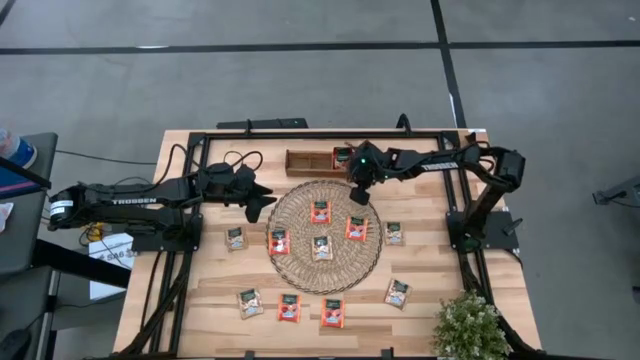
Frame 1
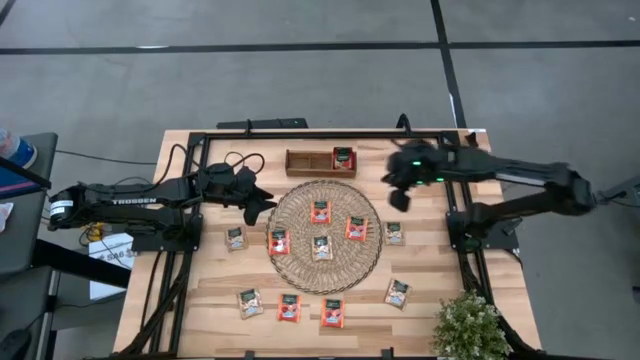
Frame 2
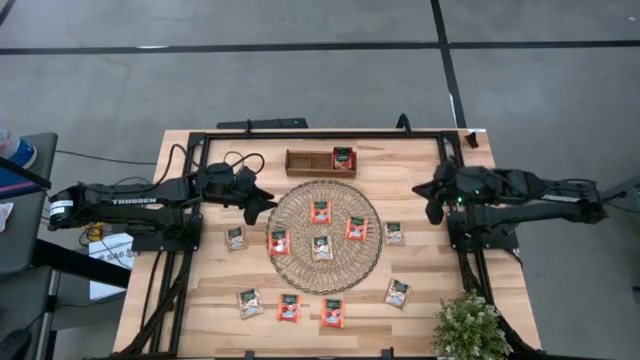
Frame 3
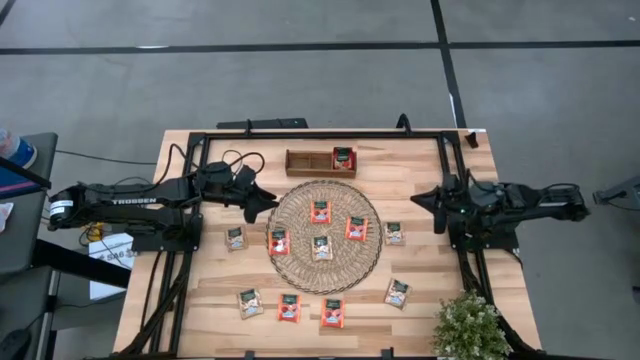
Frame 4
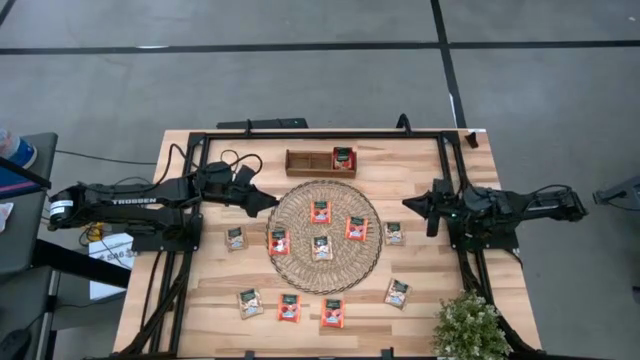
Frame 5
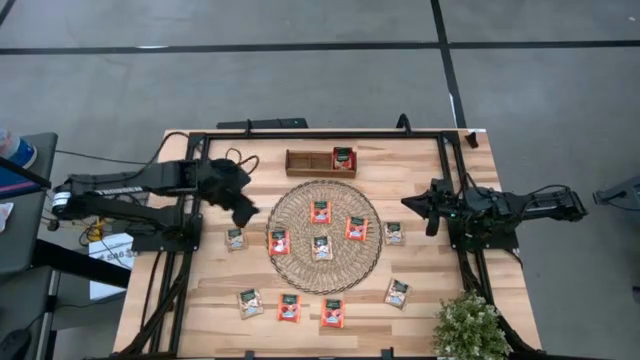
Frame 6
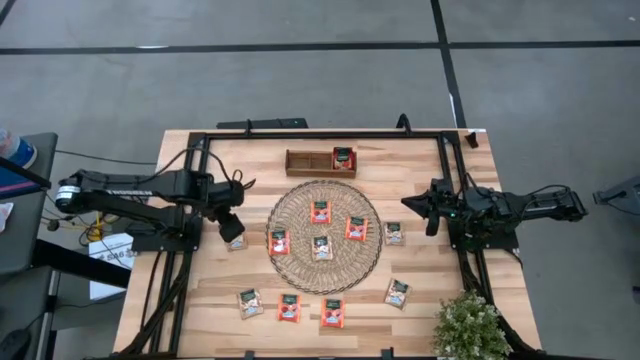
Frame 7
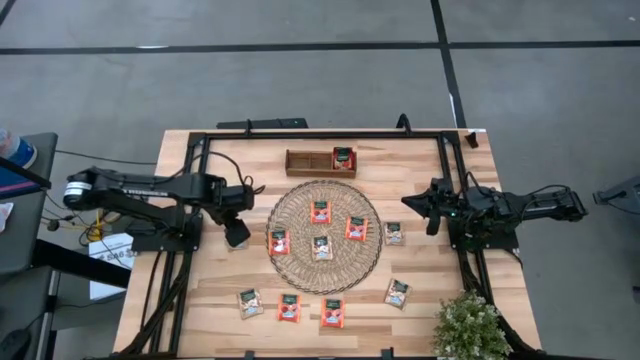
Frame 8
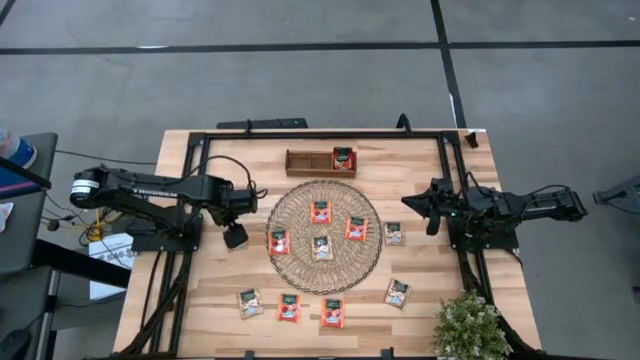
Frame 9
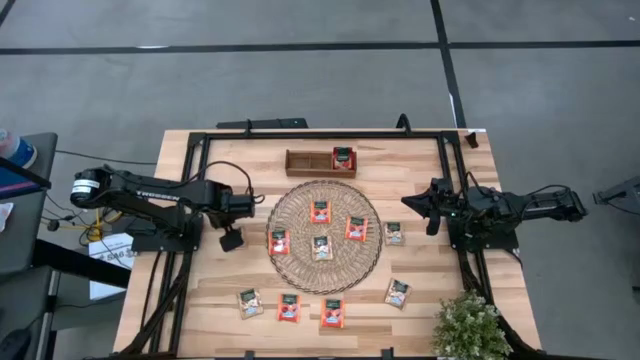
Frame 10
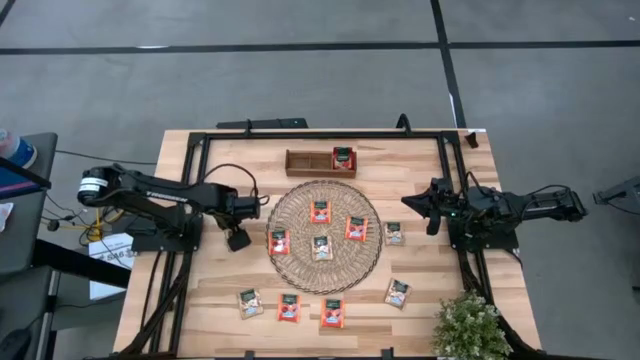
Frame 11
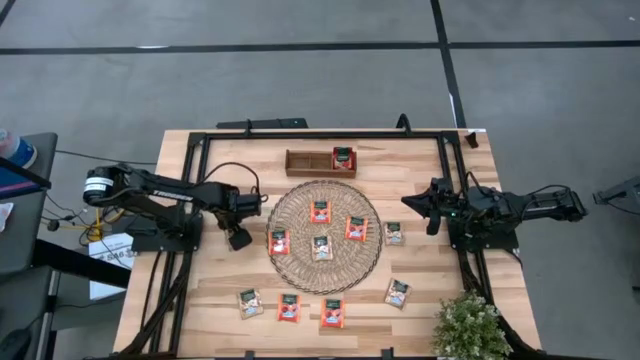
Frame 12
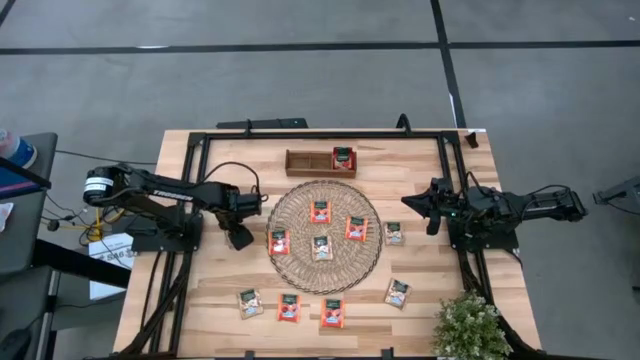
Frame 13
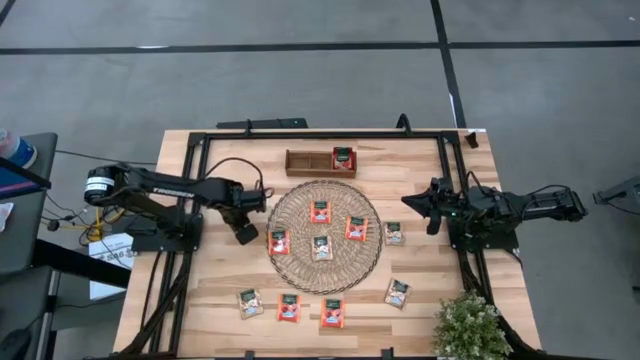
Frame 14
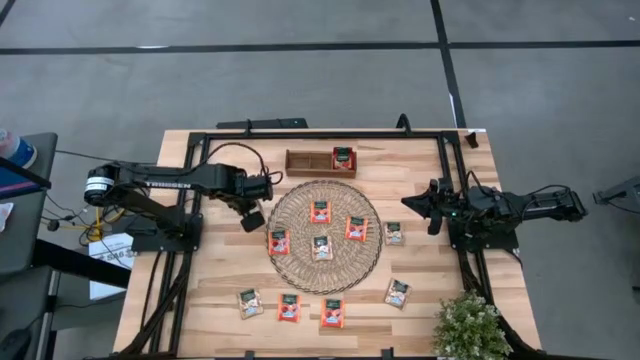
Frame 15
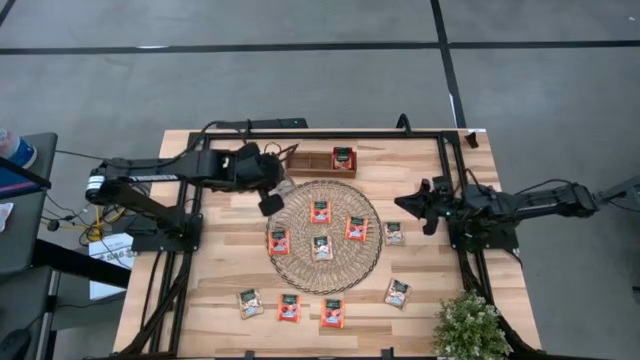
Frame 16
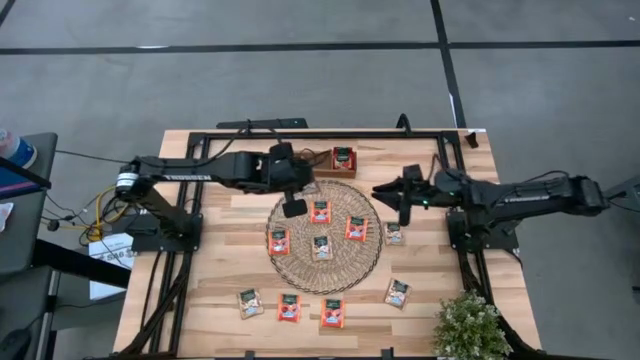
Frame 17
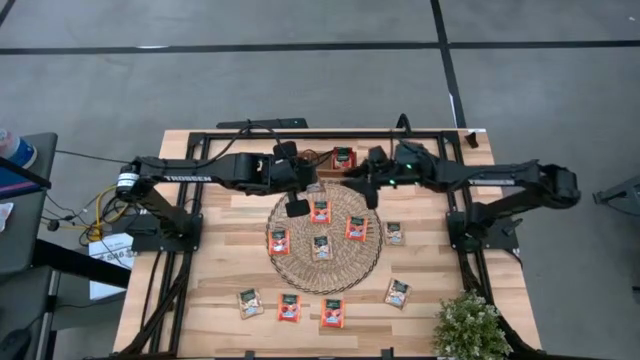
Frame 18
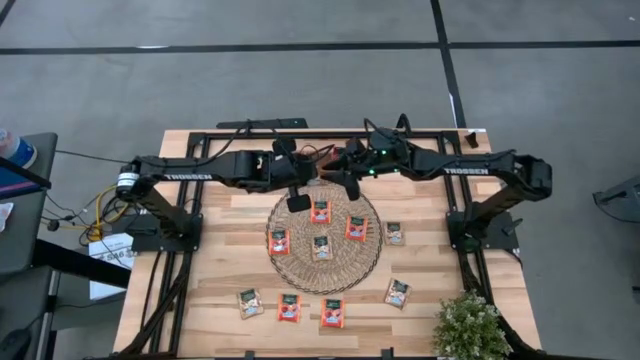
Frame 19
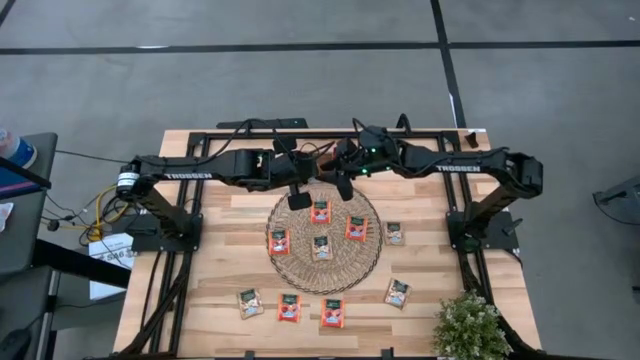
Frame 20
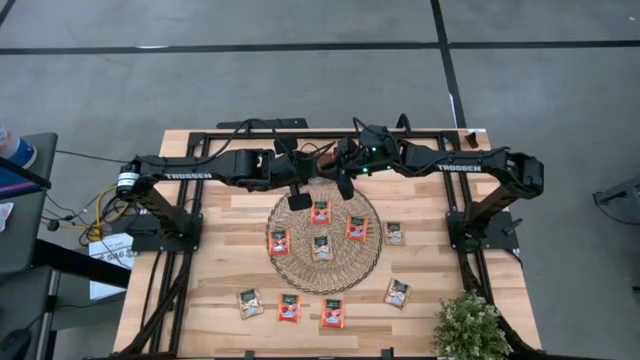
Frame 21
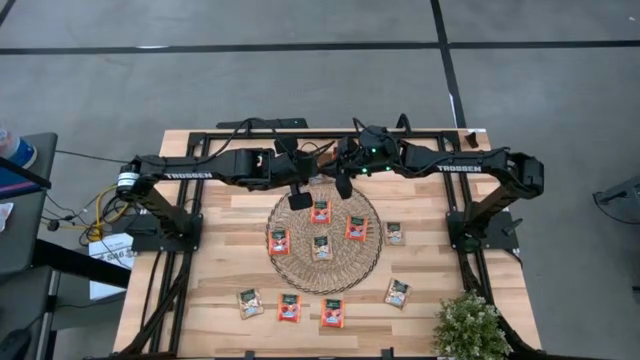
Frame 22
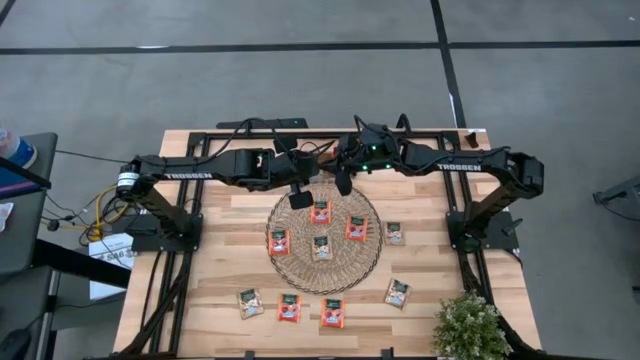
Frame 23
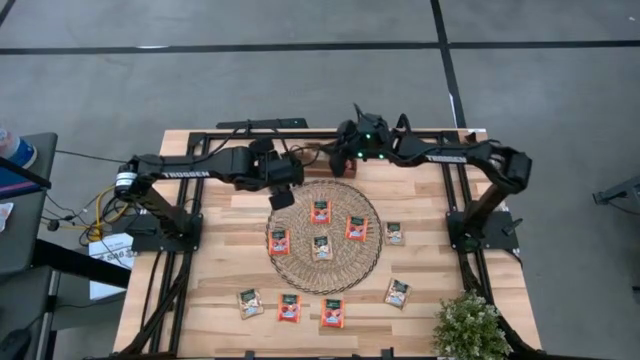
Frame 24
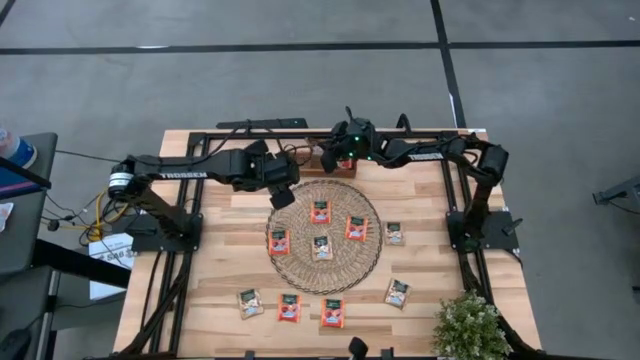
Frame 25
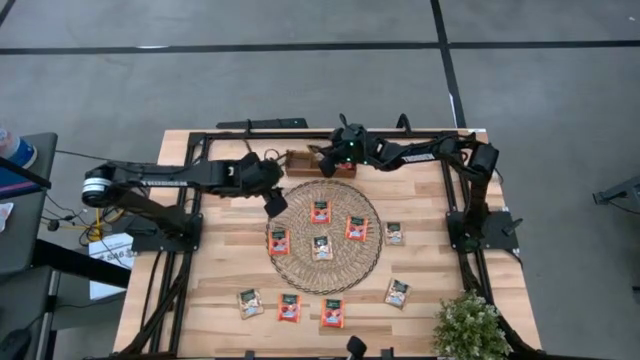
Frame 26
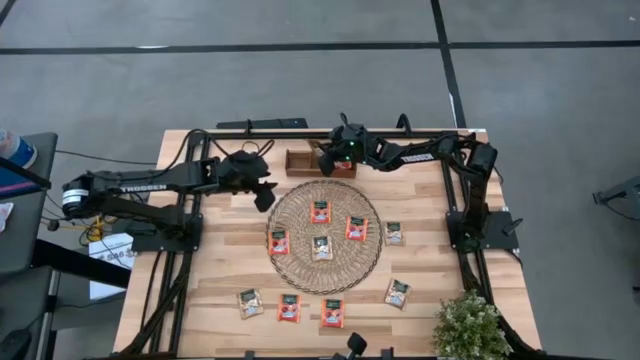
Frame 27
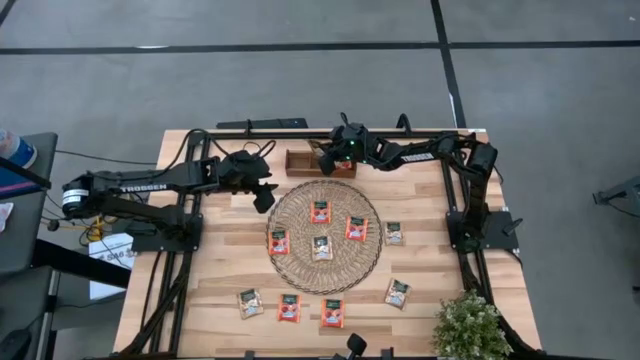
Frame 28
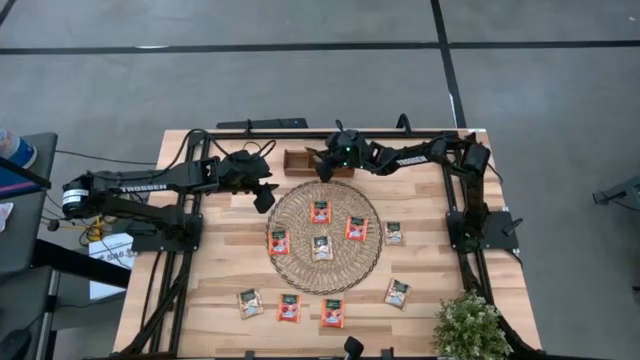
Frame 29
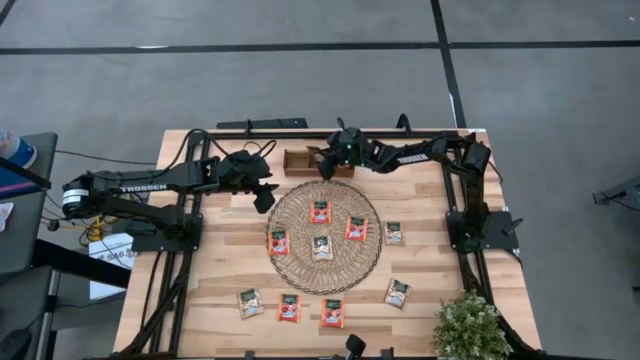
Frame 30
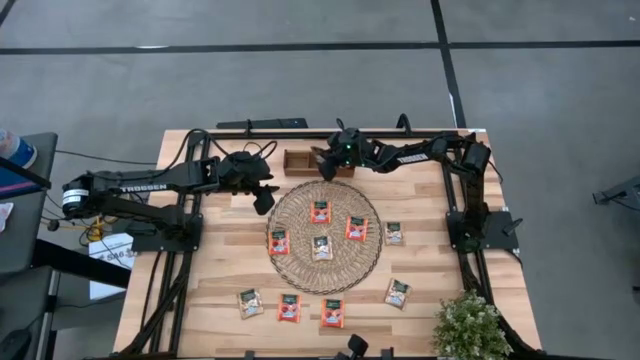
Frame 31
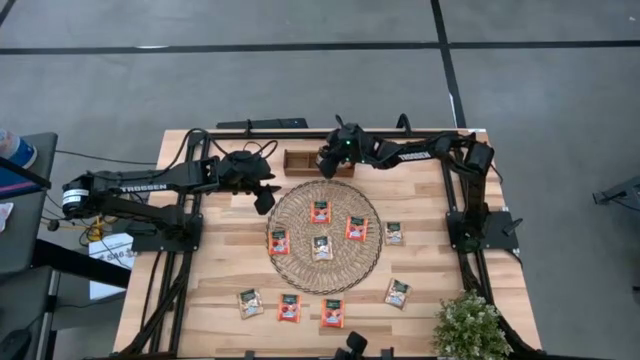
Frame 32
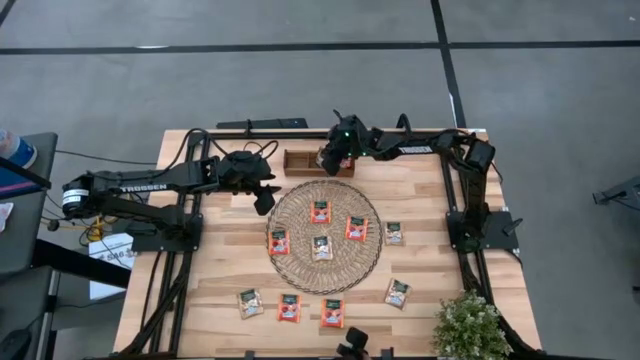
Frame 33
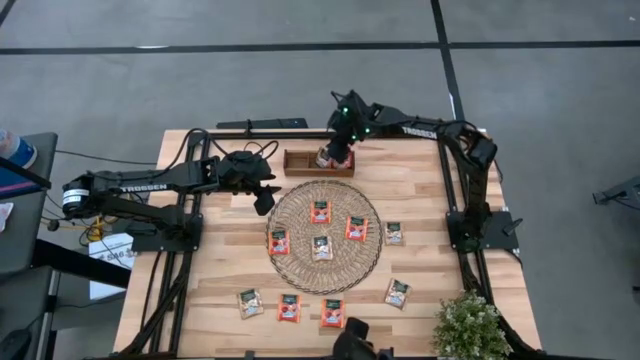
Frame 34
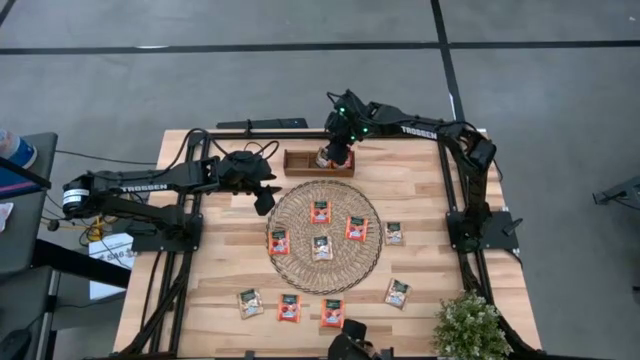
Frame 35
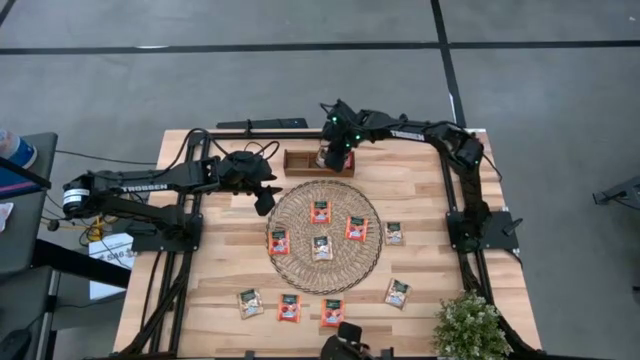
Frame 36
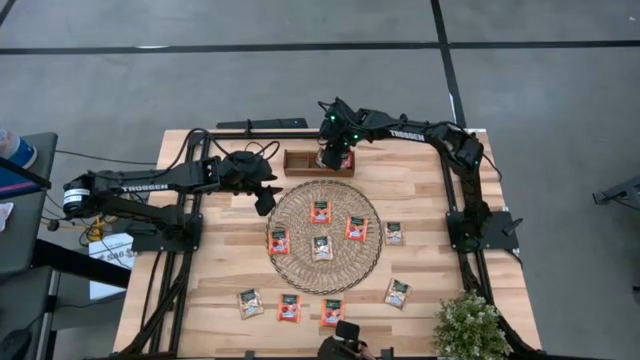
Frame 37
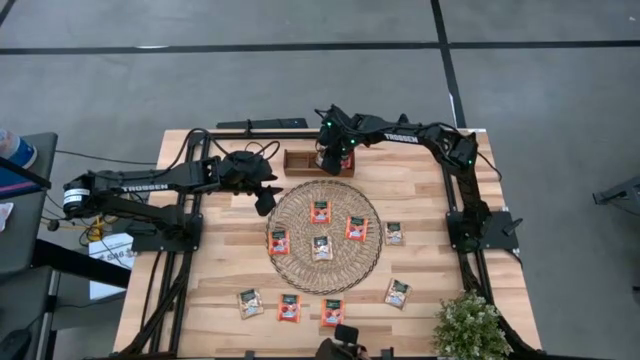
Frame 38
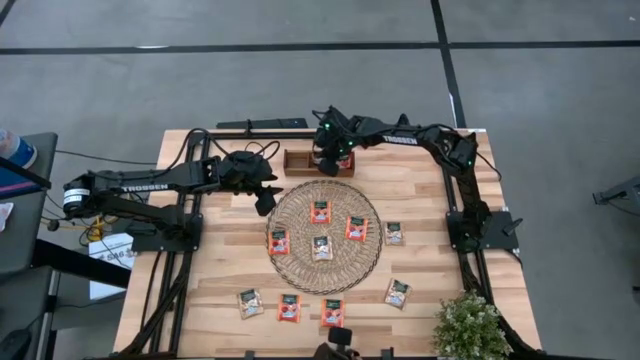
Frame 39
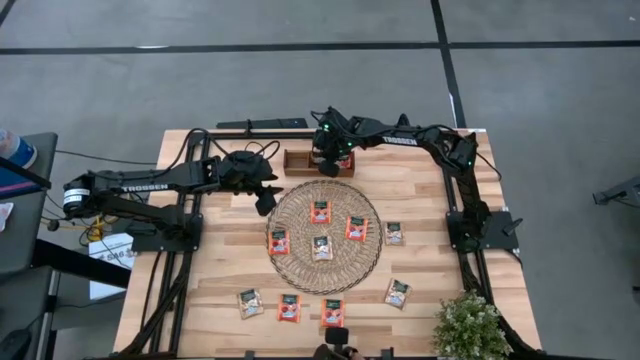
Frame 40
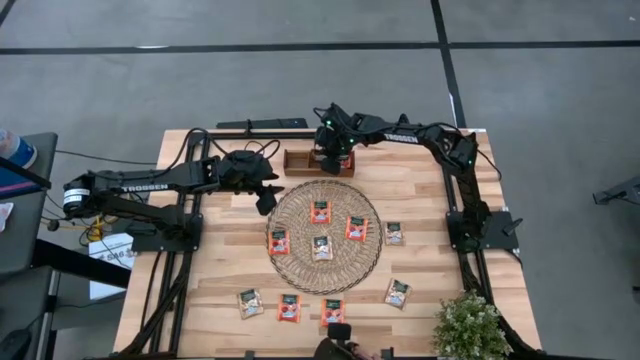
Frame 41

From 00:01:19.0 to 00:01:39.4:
Task: Pick & Place Tea
Put the brown tea bag into the middle section of the wooden organizer
